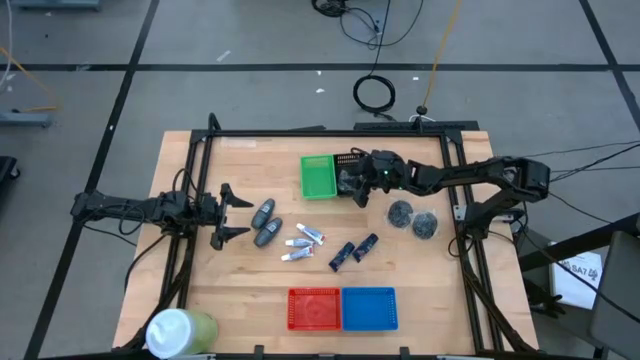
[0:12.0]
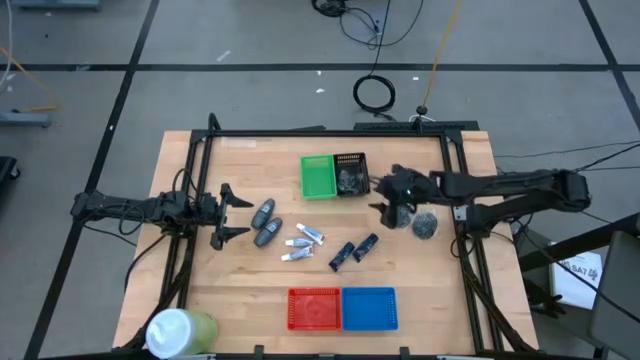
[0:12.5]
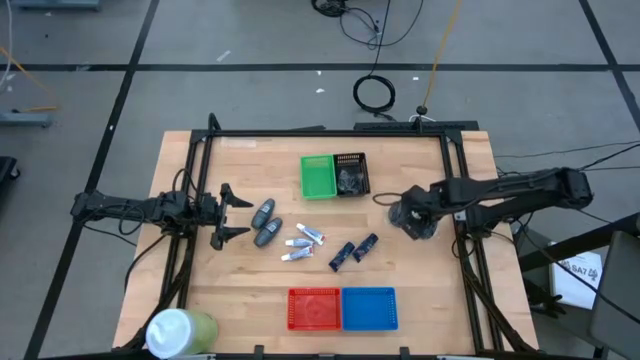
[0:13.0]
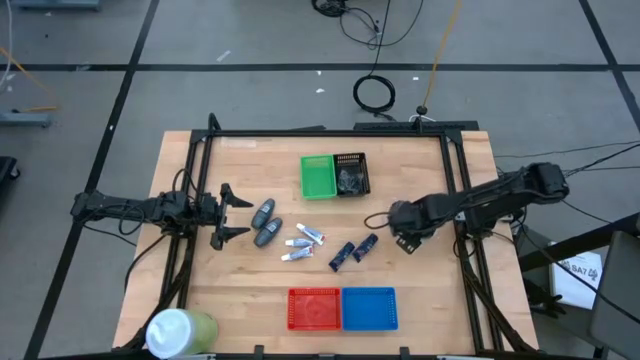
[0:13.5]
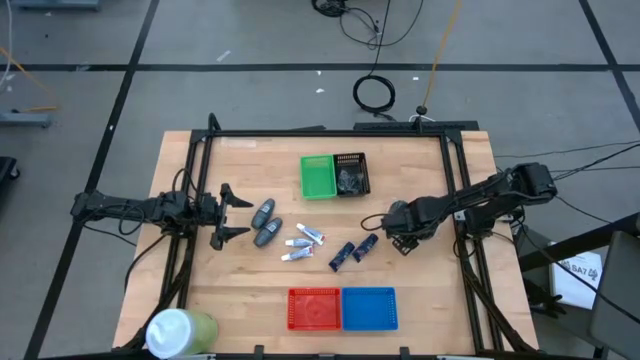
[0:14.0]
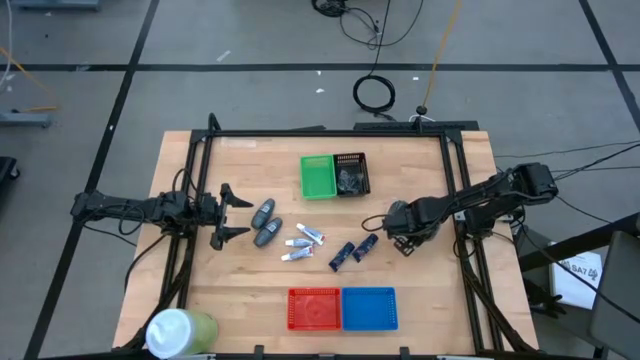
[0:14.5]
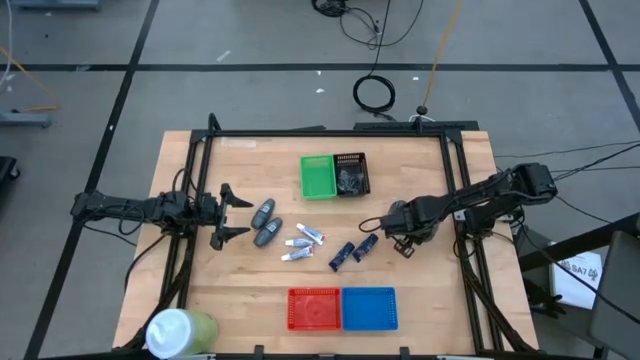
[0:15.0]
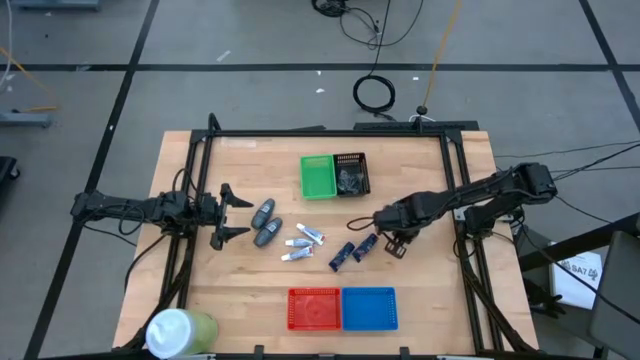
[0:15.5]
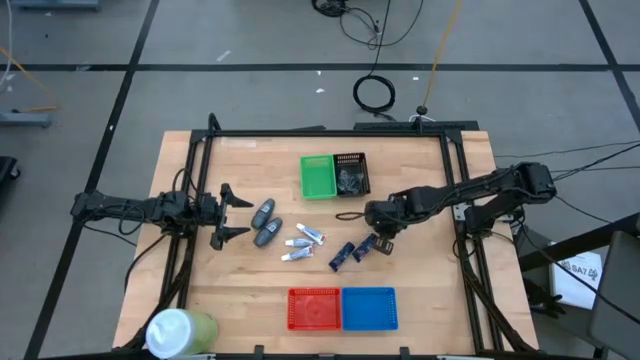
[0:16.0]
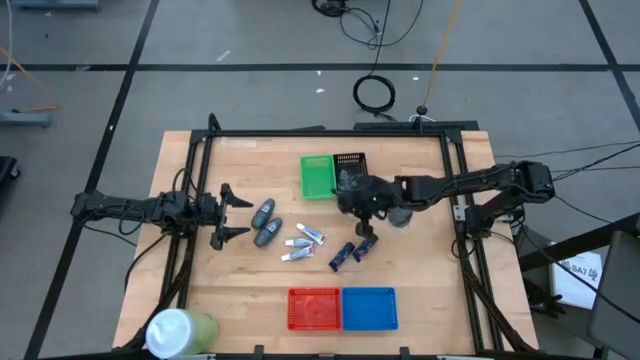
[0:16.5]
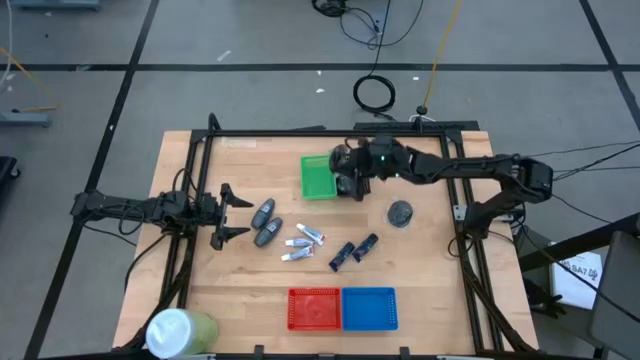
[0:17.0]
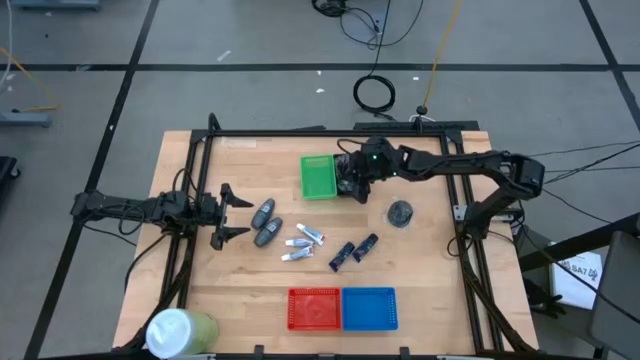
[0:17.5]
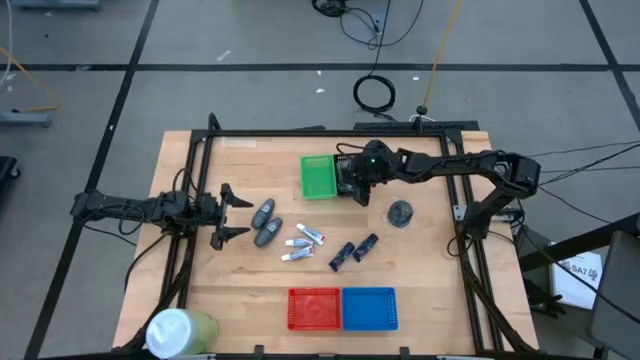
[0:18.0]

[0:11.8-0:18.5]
Task: Pick & Place Travel size toiletries
Put the right hairbrush into the black bin

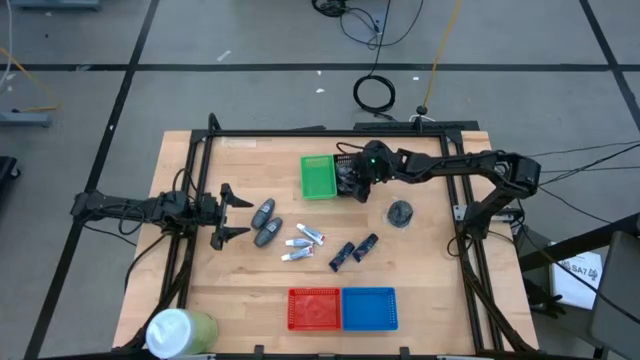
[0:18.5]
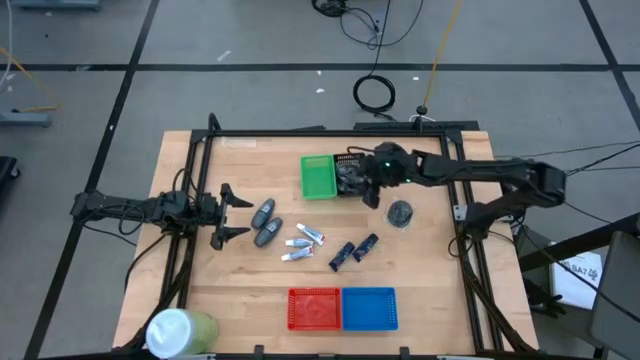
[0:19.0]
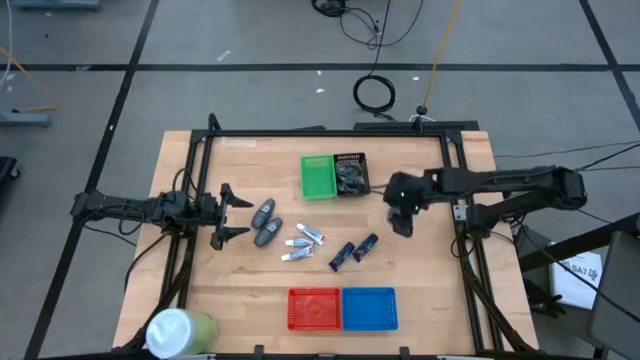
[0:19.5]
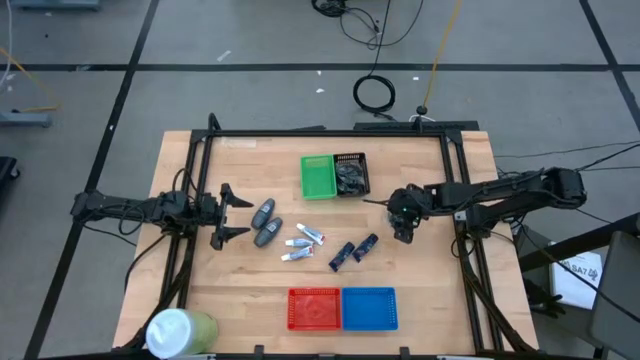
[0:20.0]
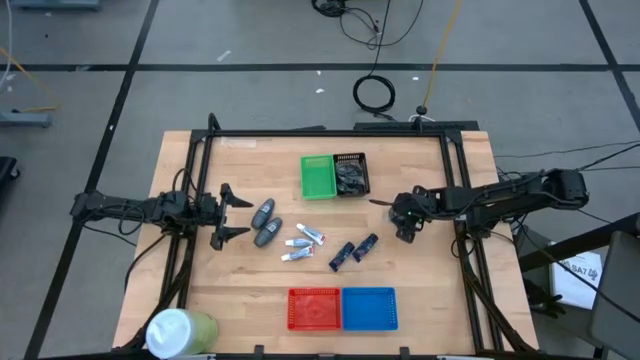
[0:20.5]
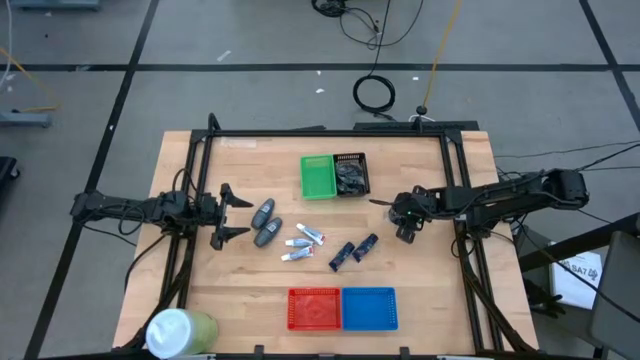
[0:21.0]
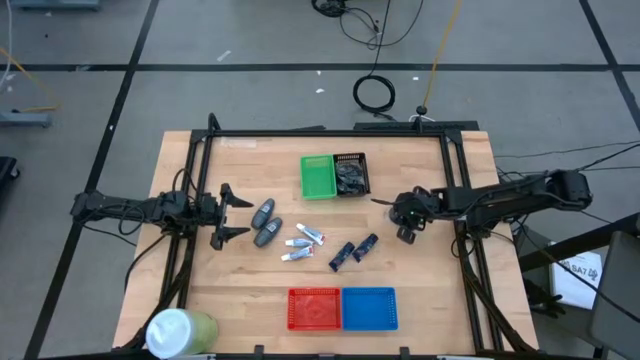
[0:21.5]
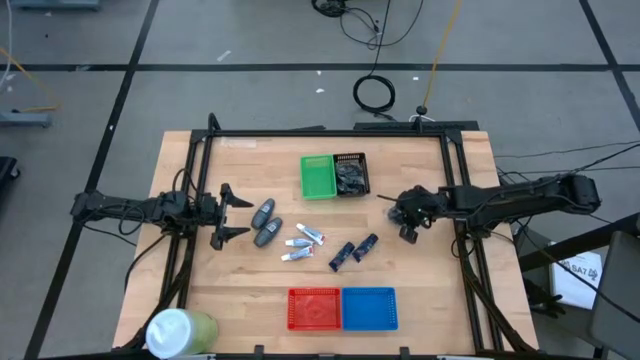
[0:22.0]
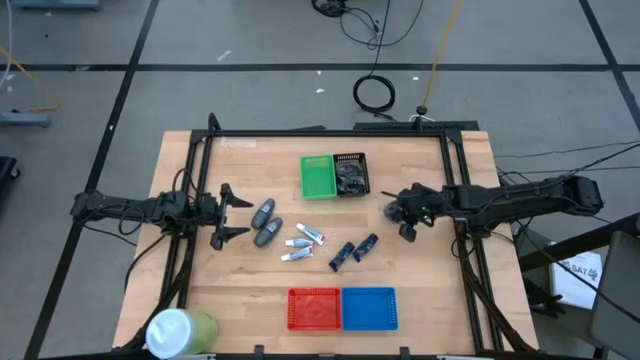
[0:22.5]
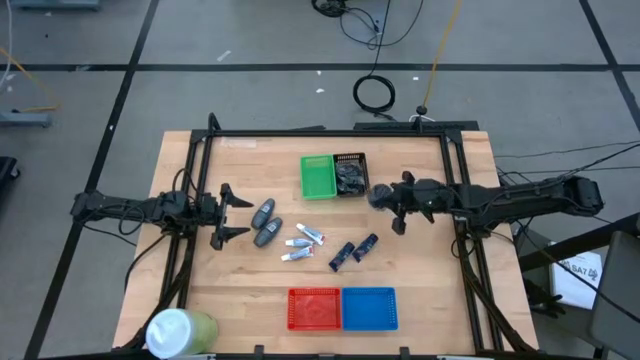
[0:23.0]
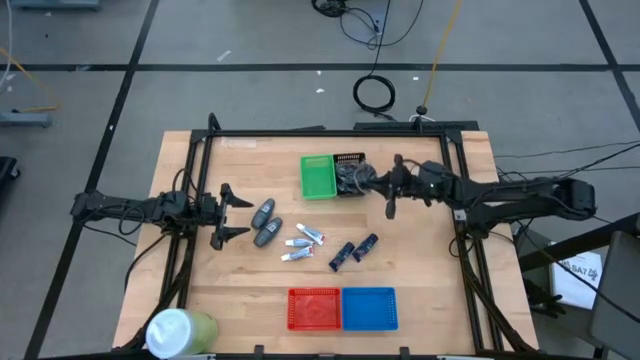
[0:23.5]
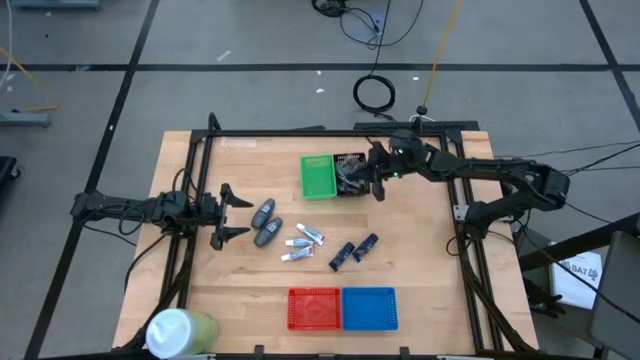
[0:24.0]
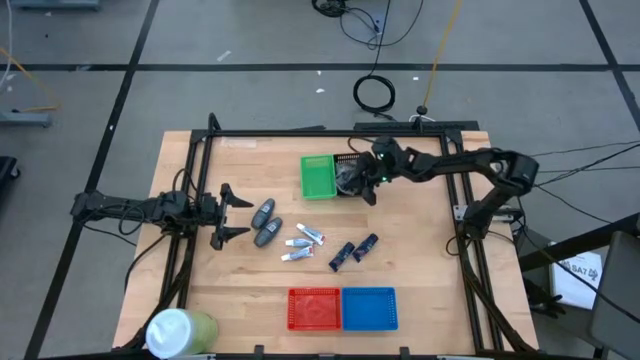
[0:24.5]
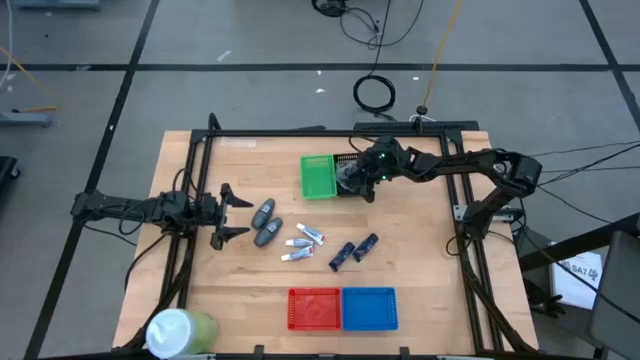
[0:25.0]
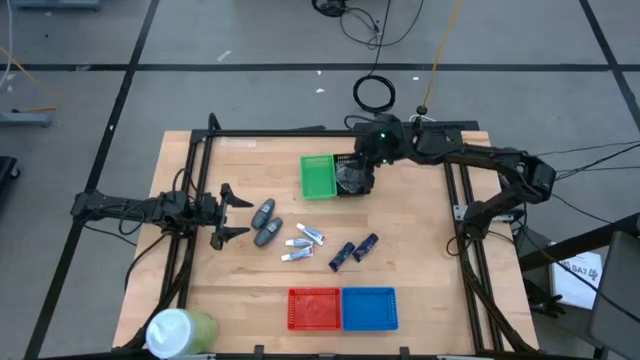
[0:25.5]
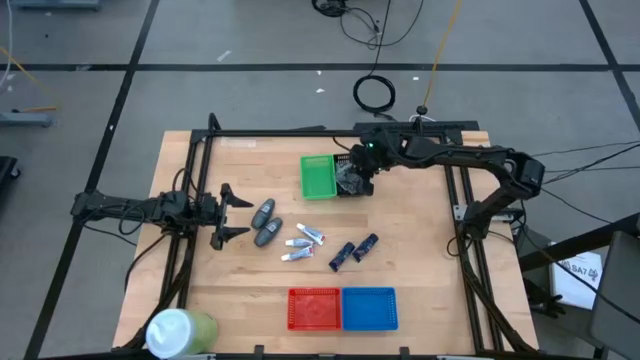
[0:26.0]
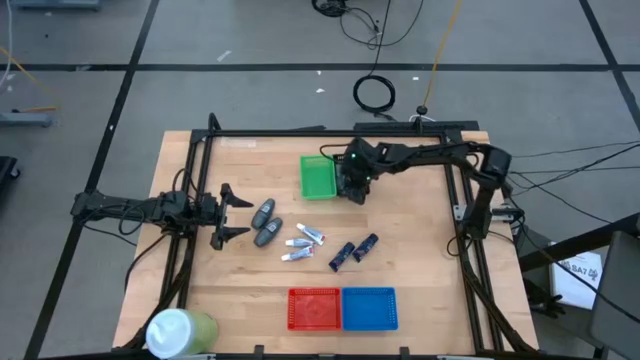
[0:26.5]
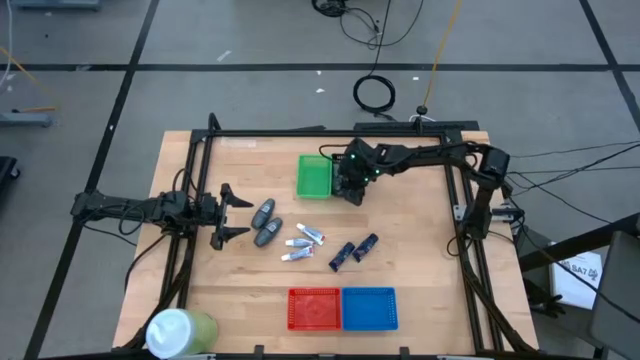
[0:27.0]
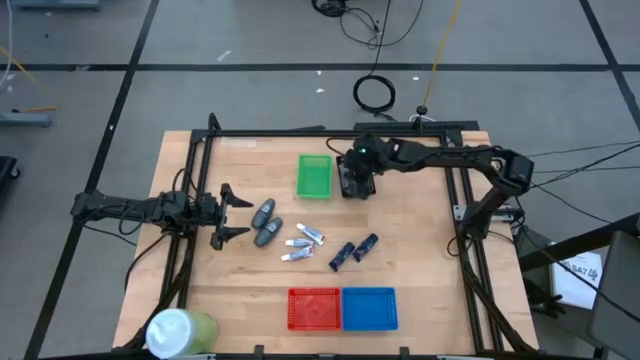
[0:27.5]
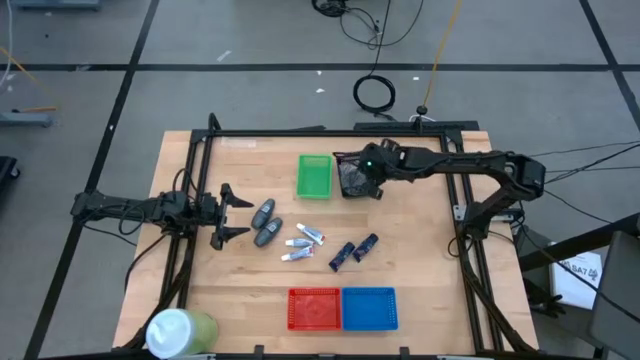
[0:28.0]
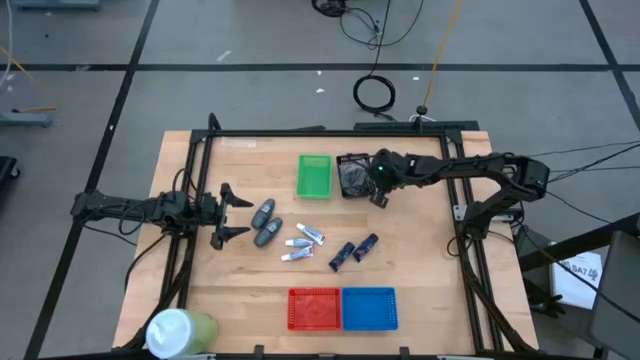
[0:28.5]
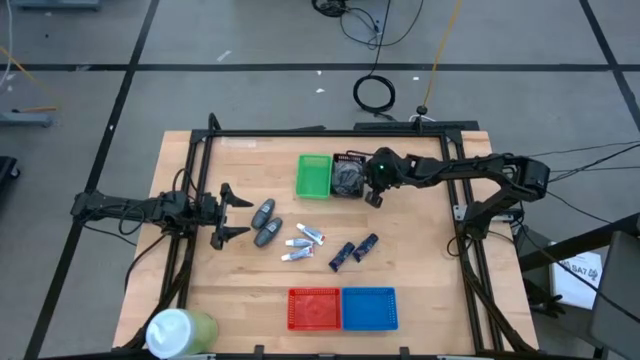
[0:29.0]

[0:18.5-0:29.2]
Put the hairbrush into the black bin

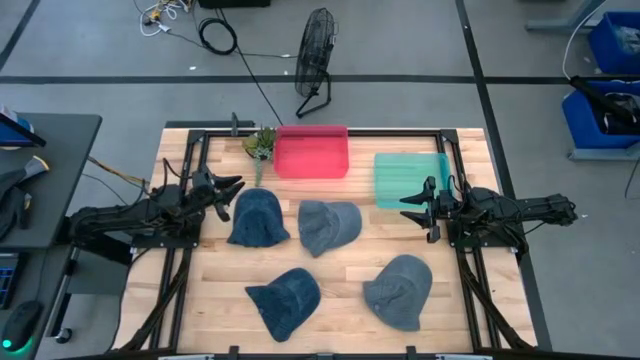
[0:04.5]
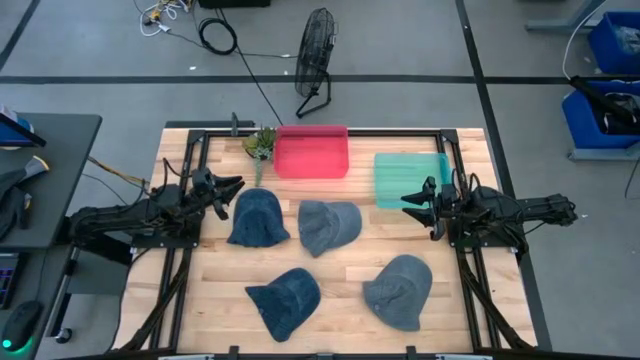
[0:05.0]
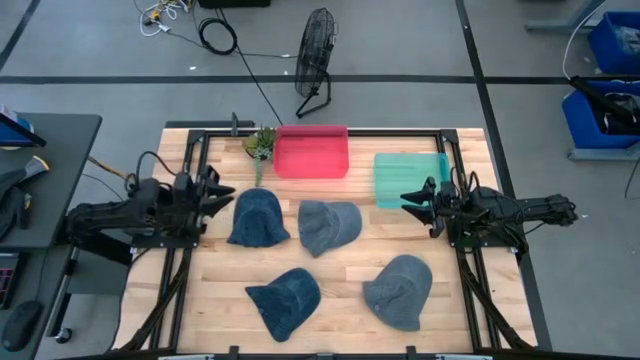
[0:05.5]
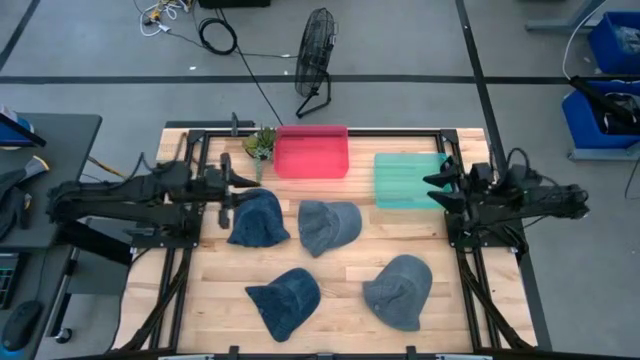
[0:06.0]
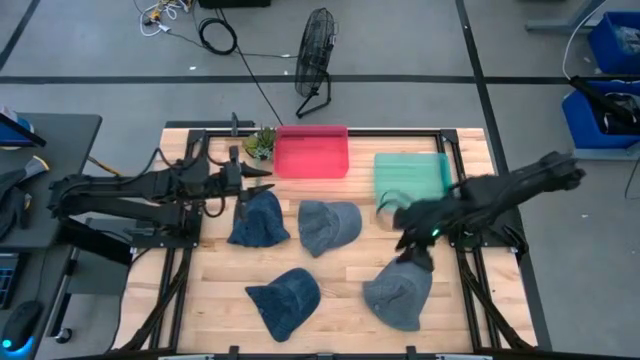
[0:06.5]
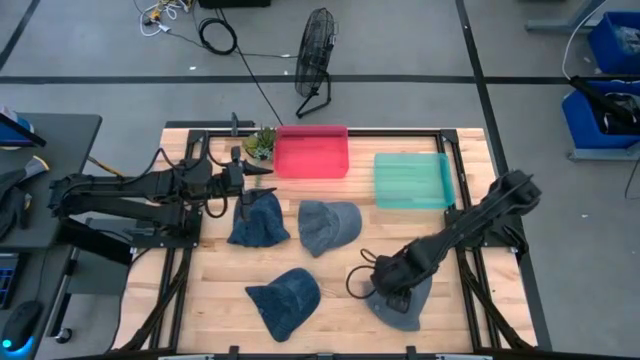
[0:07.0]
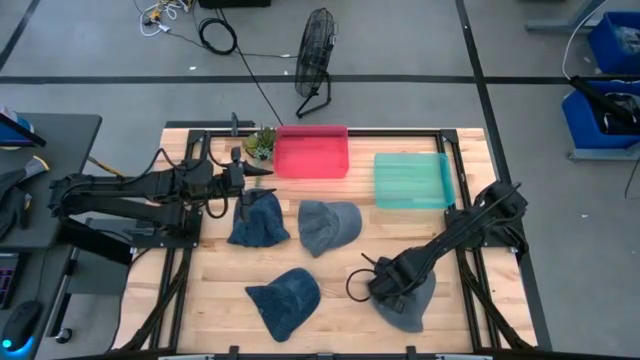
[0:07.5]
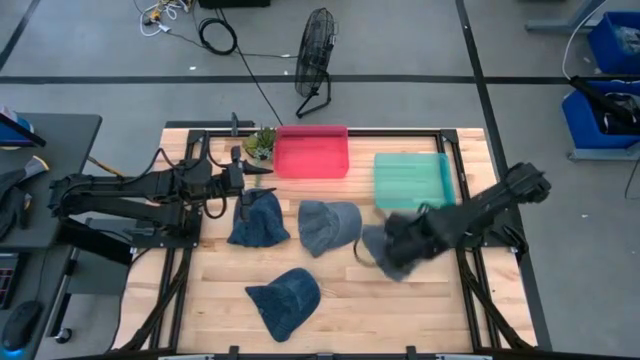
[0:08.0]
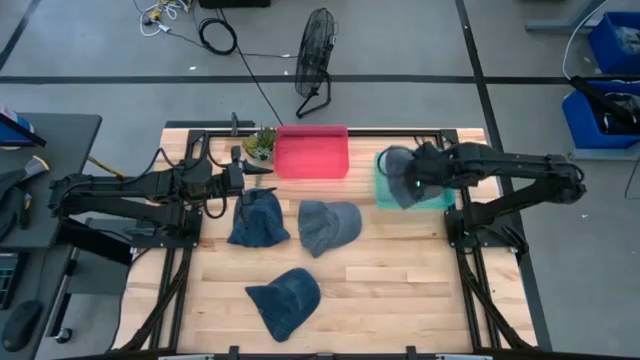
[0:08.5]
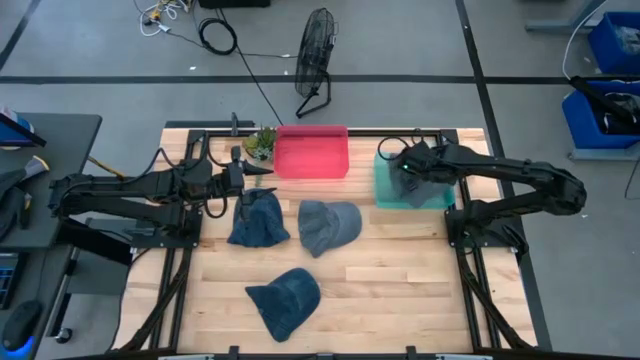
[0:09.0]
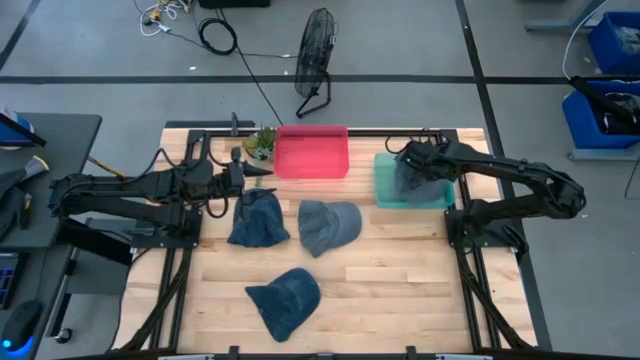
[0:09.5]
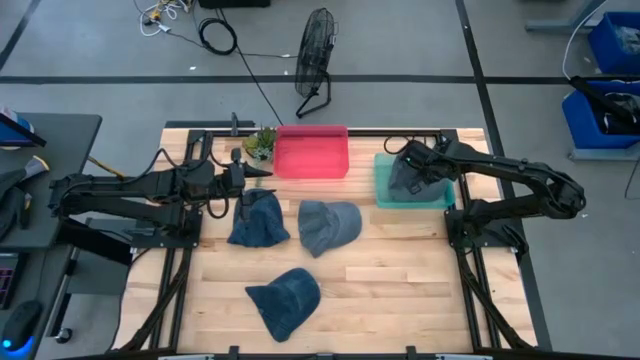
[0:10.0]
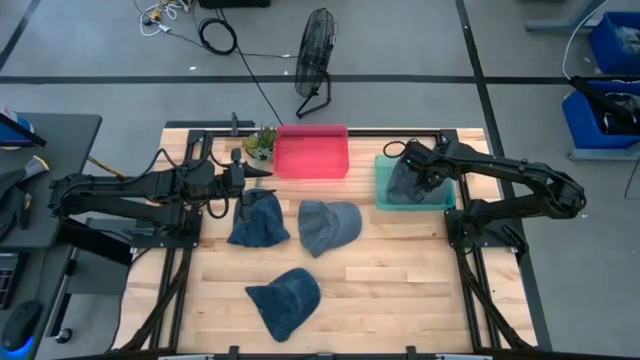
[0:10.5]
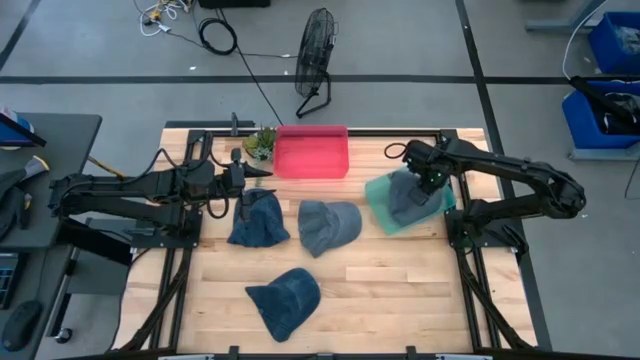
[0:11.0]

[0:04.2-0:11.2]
Task: Pick & Place hat
Put the bottom gray cap into the green bin
